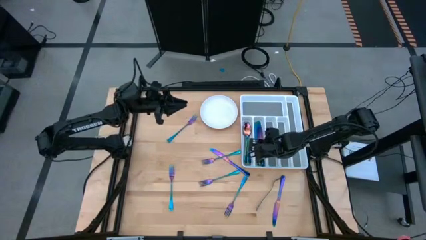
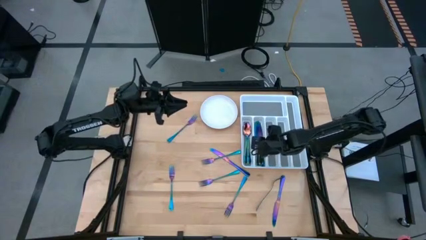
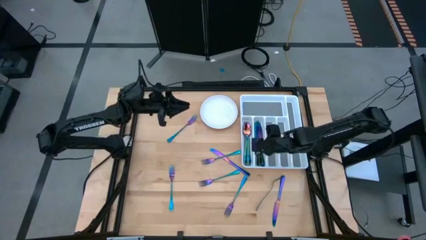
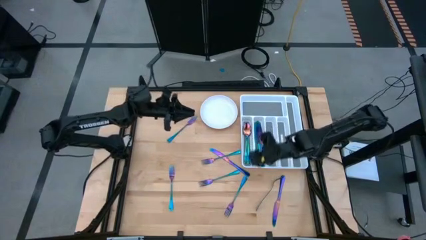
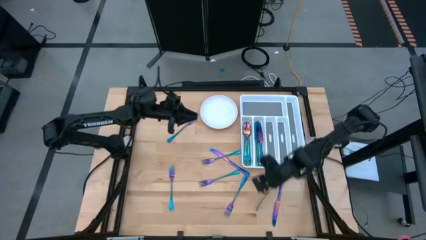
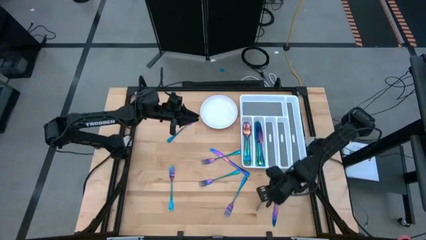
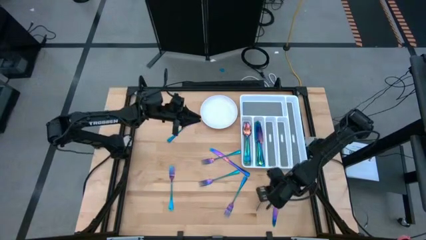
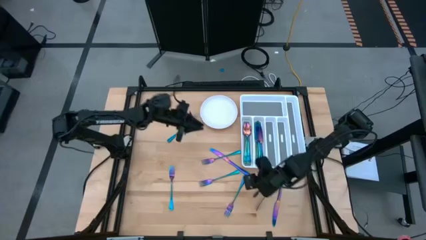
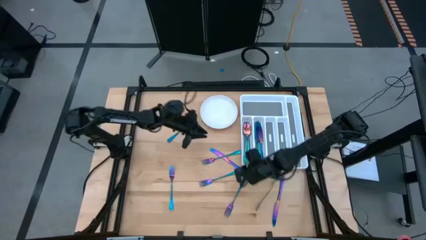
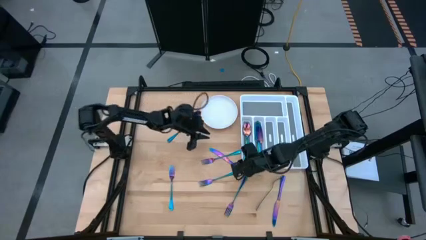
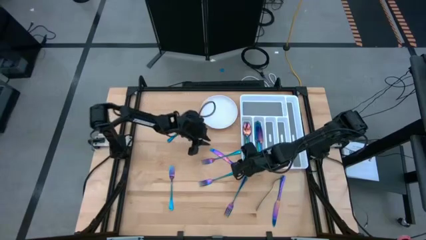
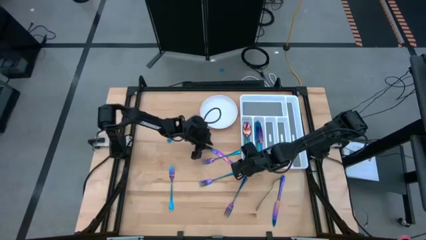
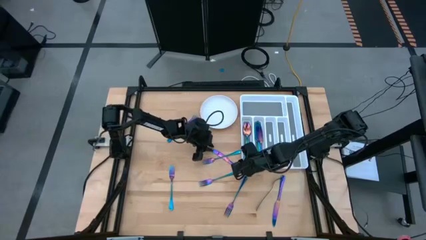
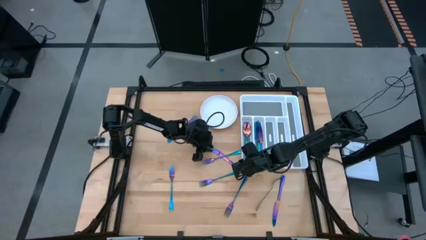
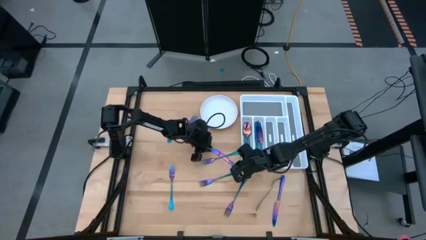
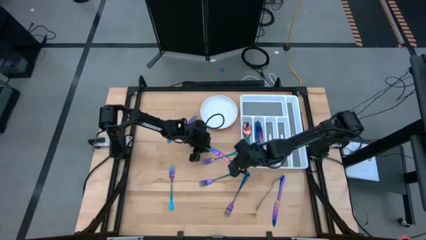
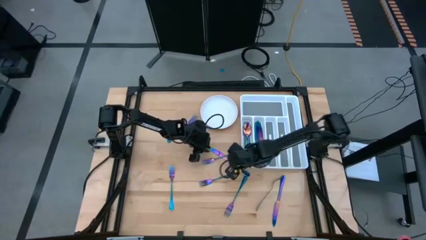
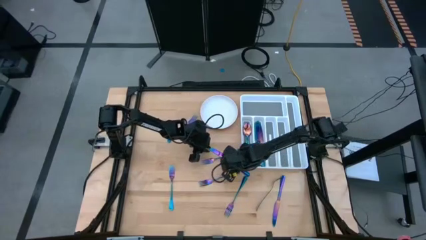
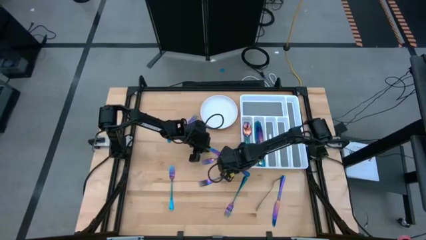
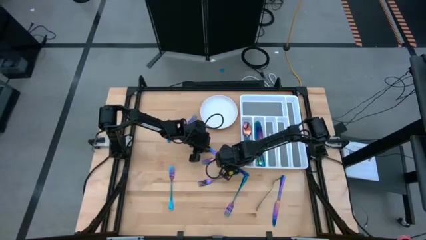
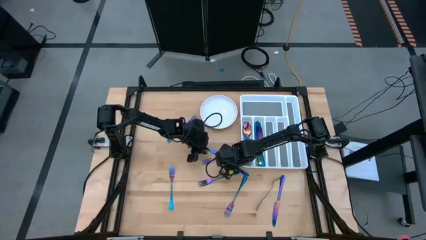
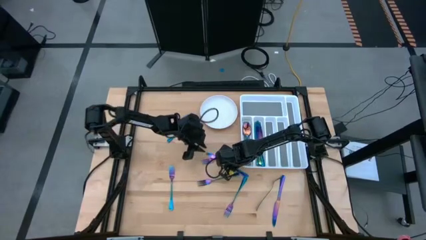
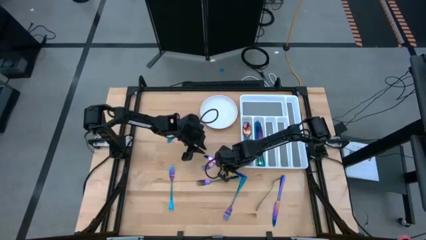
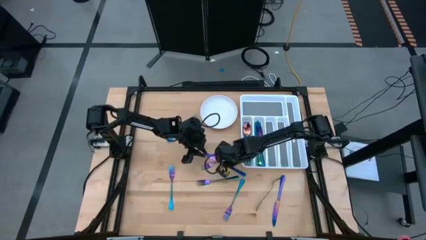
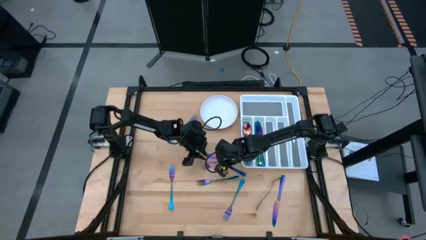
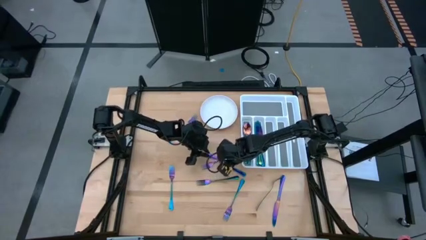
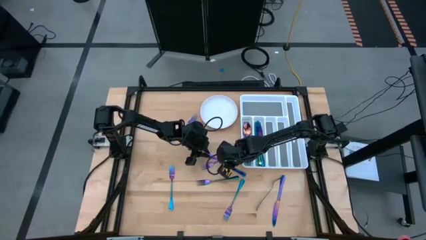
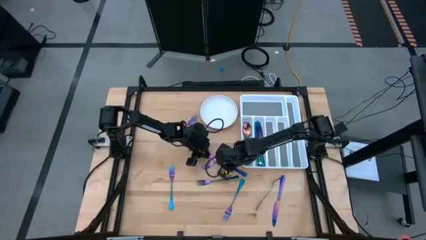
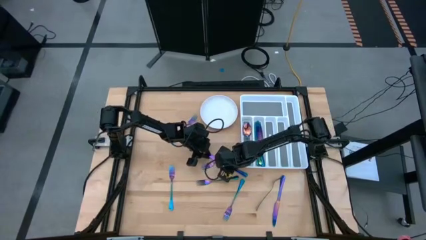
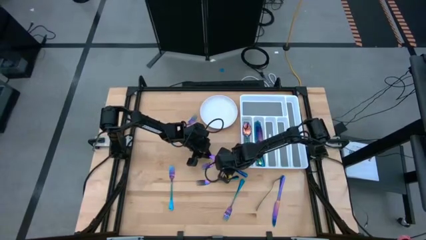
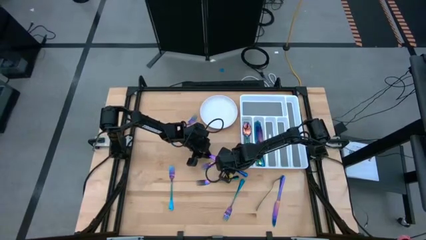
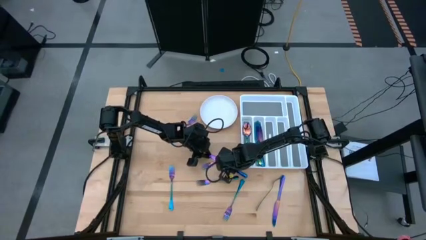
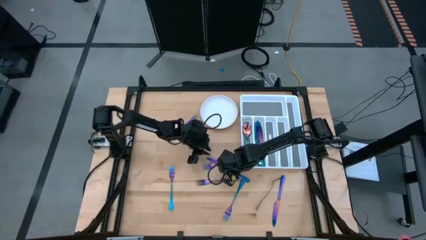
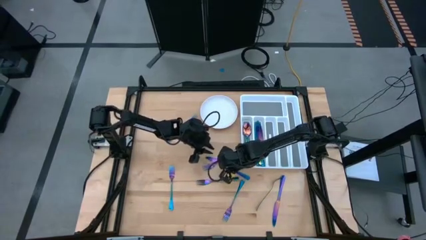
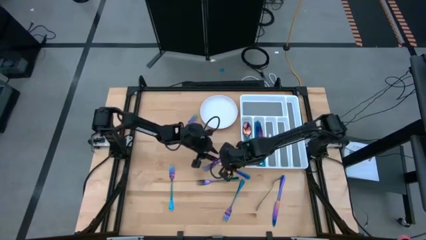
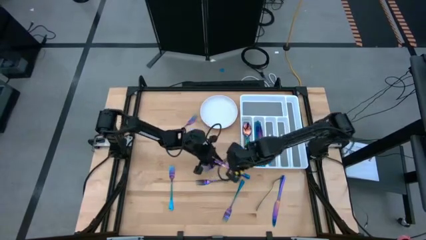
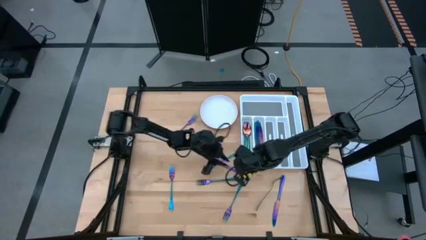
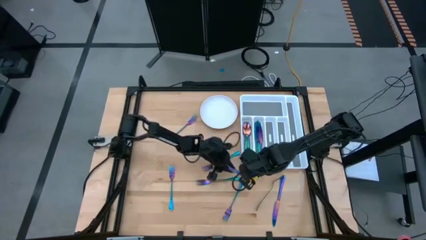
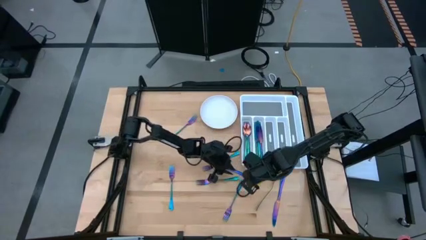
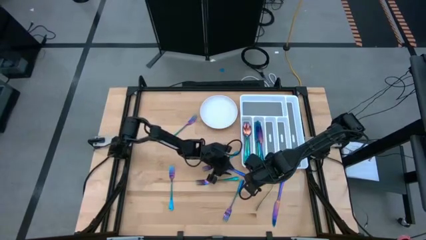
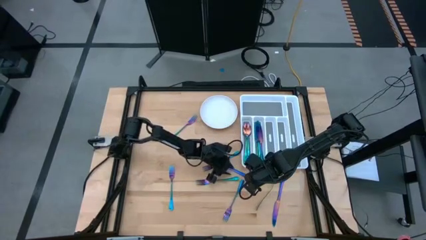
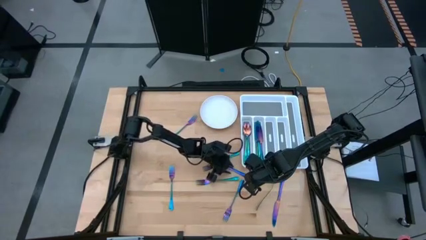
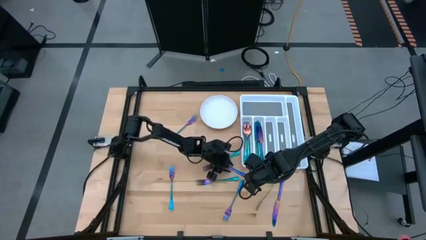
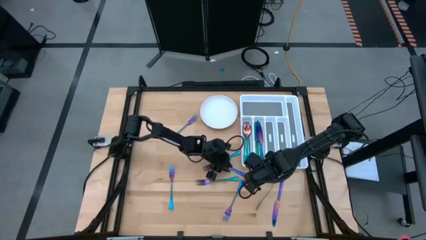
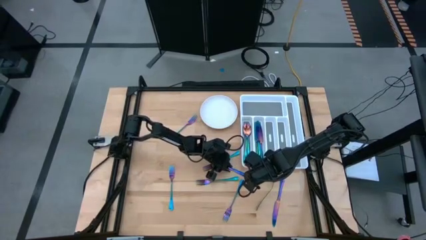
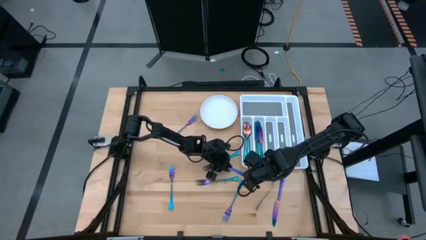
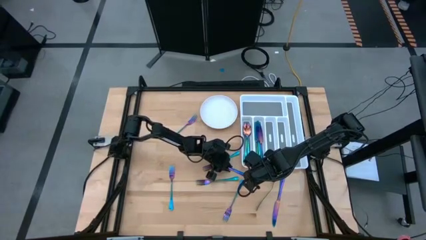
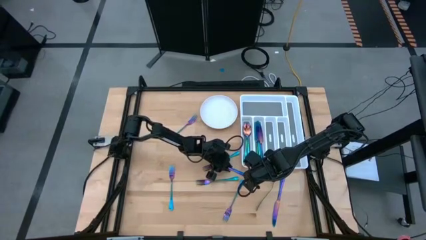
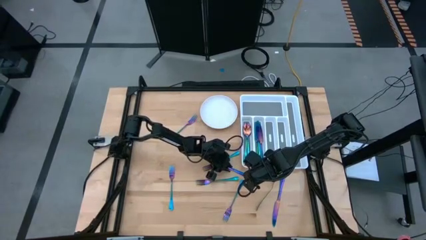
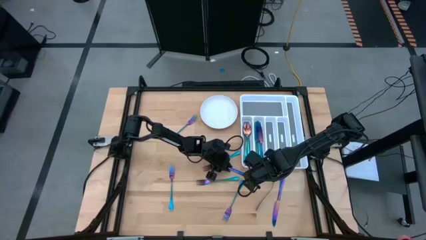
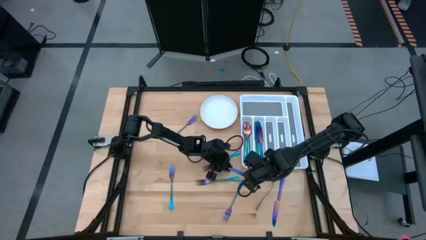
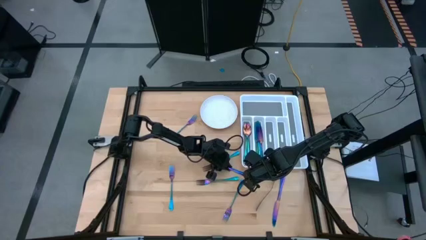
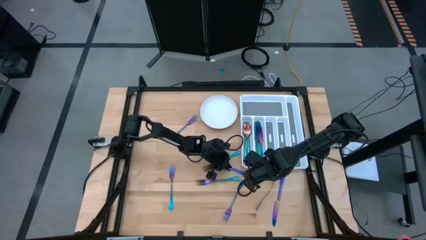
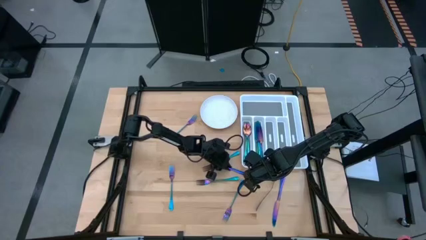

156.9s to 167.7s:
Task: Sort silverware
Put the purple knife on the white silverware tray

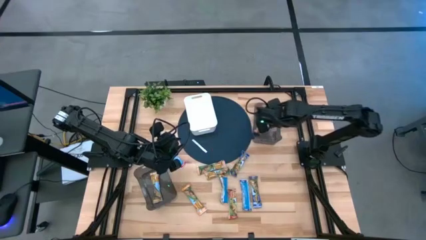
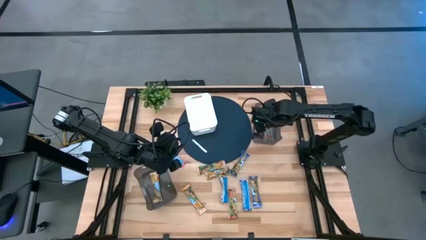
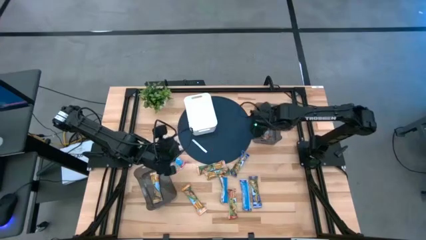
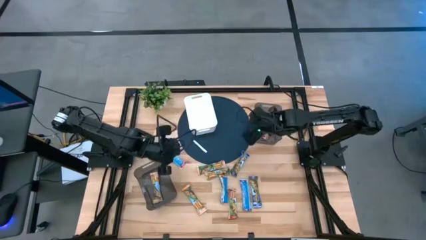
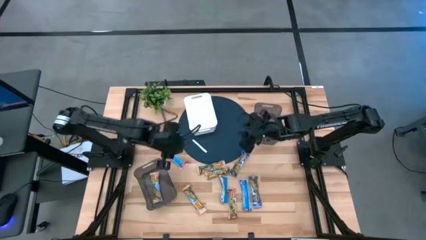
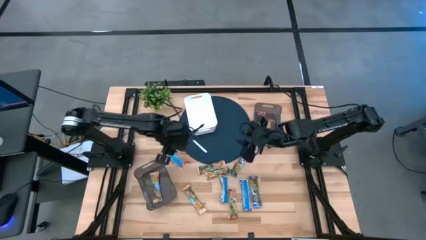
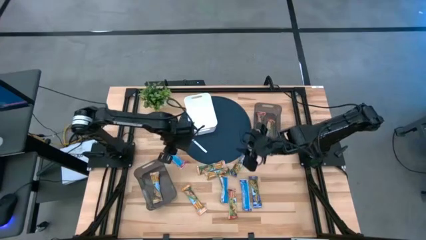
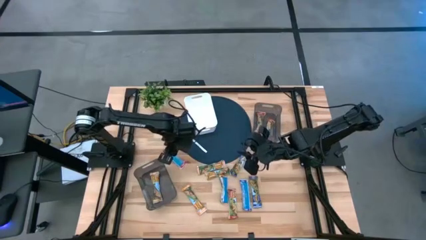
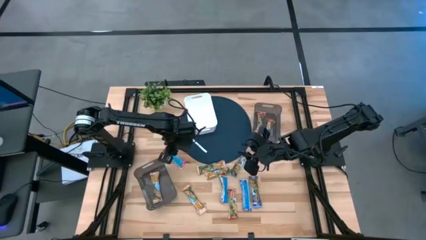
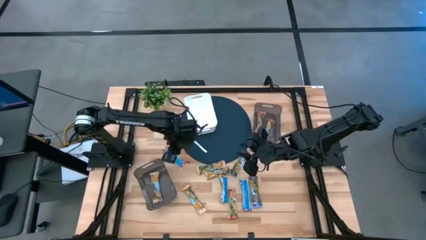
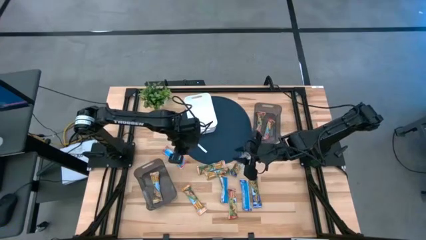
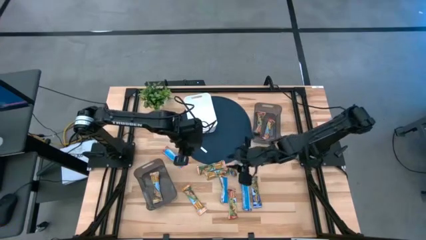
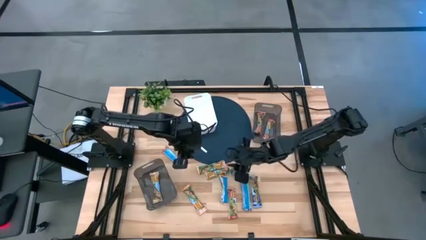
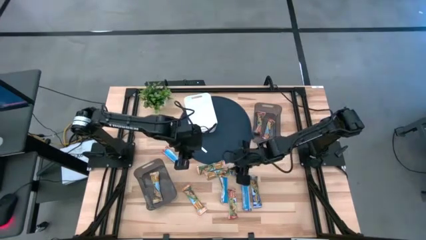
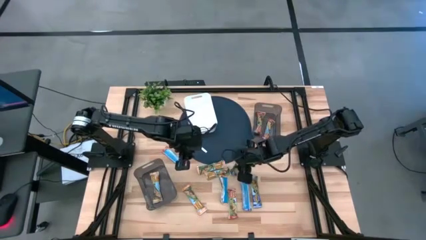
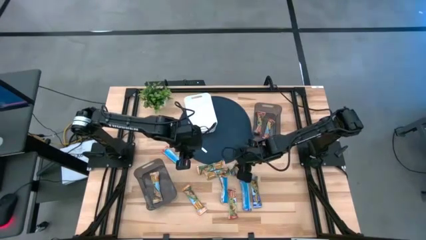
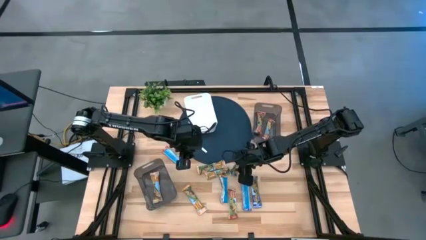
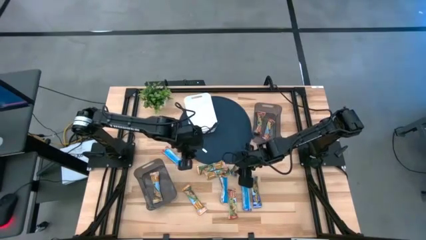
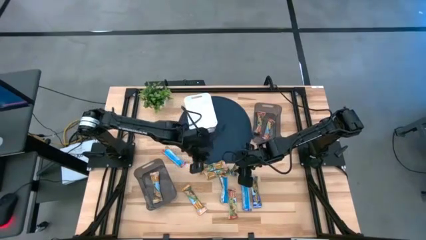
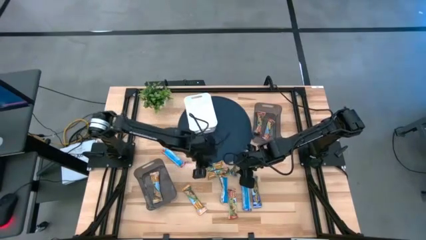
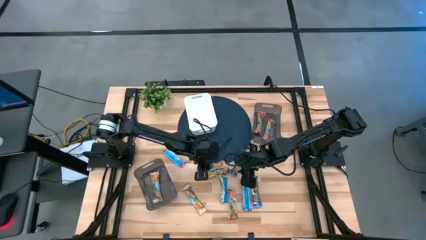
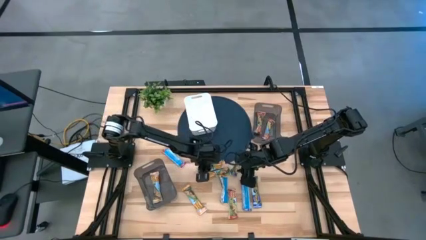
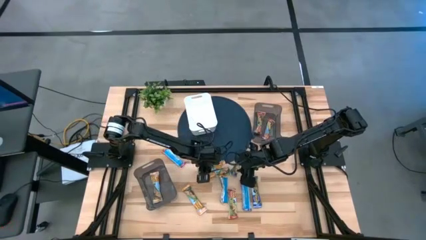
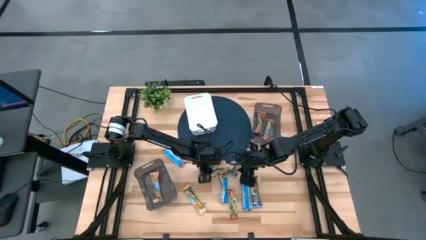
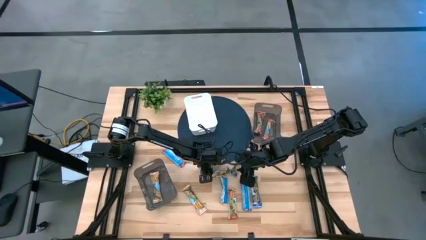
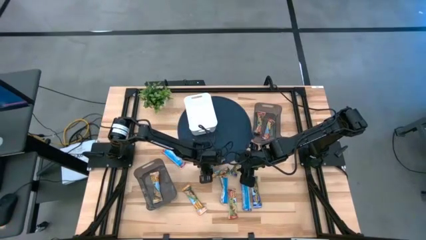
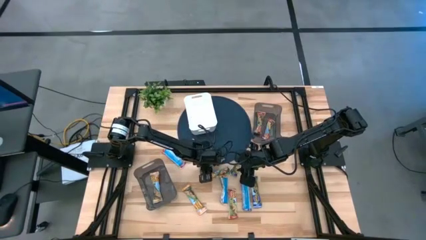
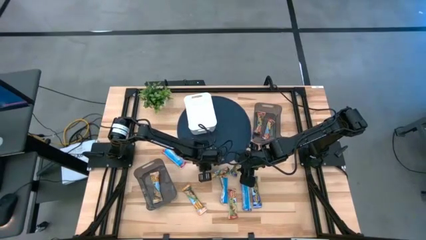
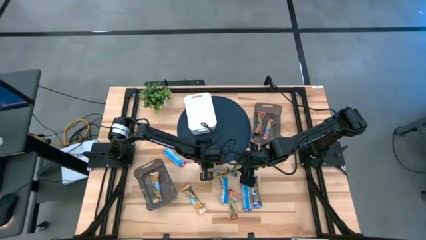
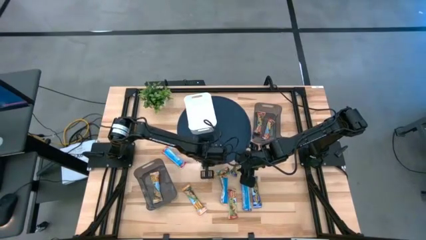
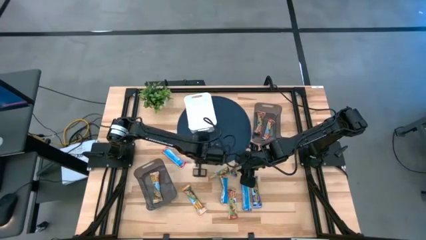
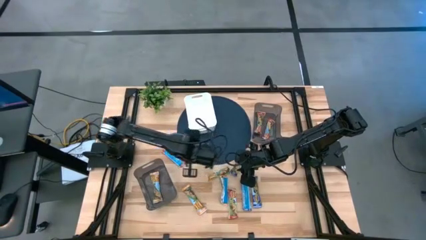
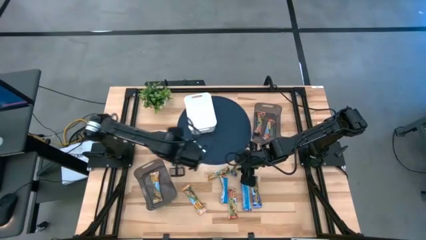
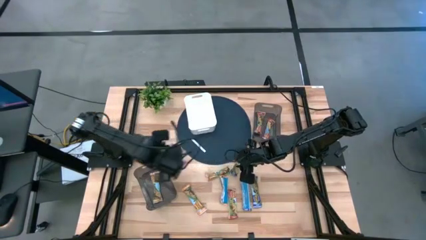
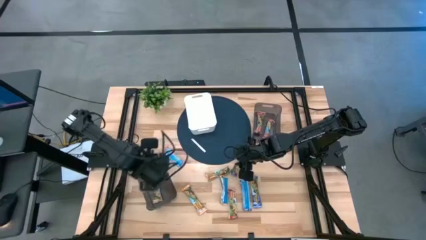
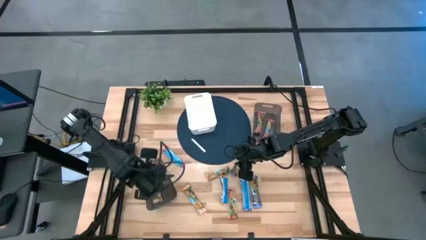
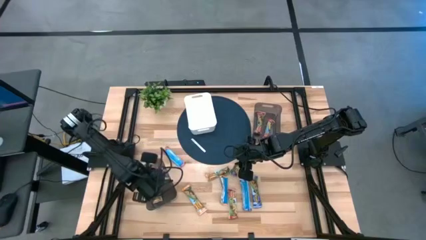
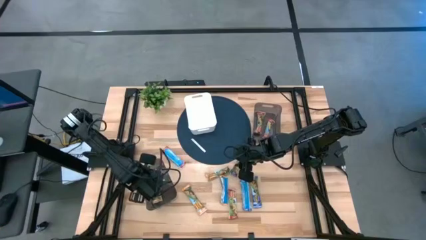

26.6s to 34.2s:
Task: Pick and place Granola Bars by type
Put the yellow granola bar into the bottom black bin
